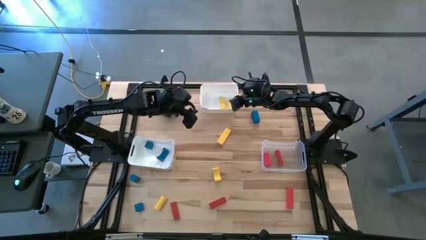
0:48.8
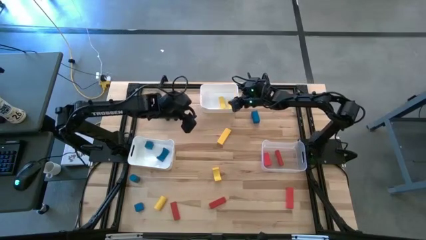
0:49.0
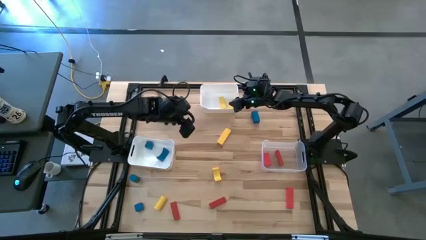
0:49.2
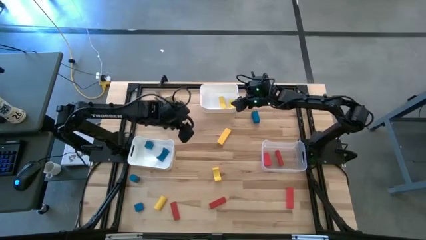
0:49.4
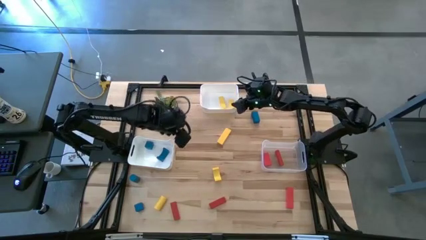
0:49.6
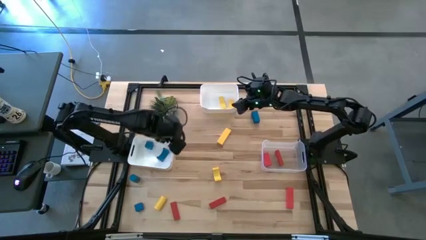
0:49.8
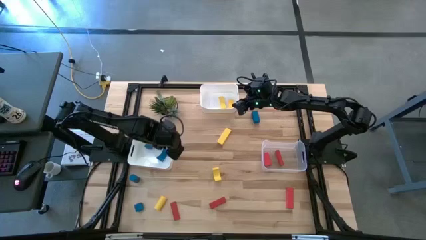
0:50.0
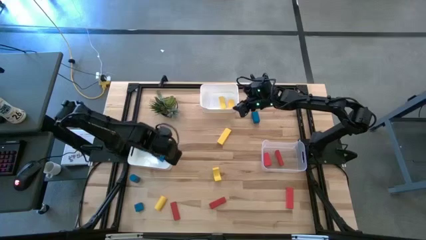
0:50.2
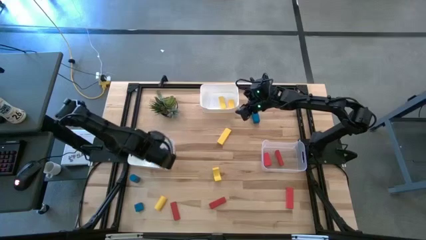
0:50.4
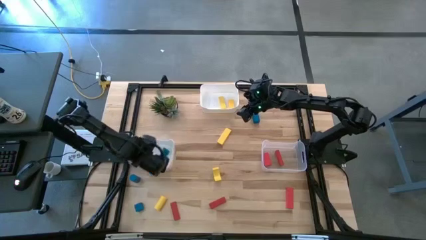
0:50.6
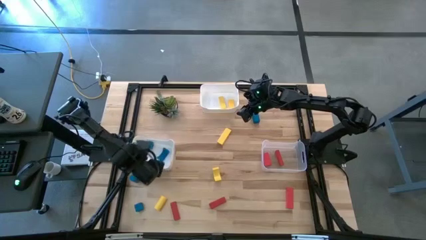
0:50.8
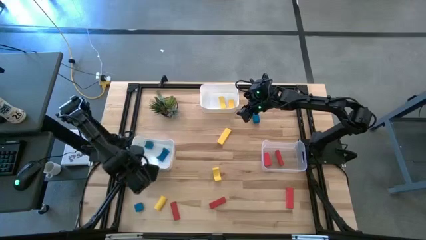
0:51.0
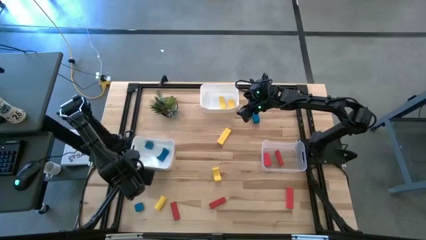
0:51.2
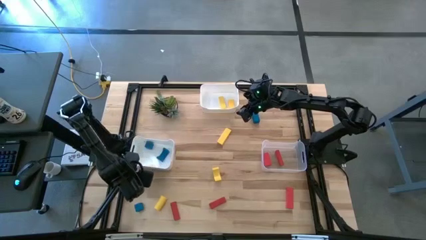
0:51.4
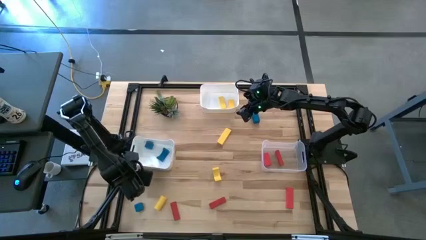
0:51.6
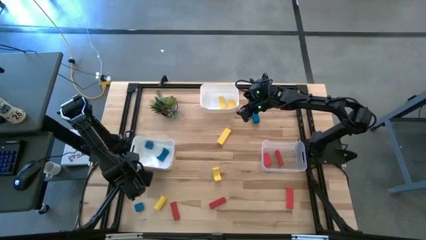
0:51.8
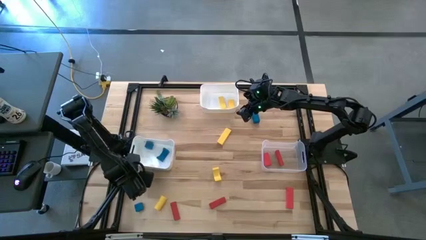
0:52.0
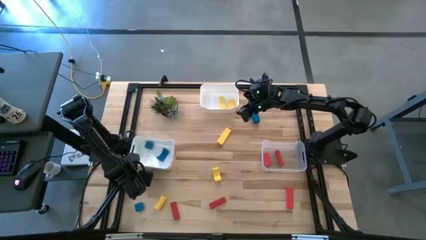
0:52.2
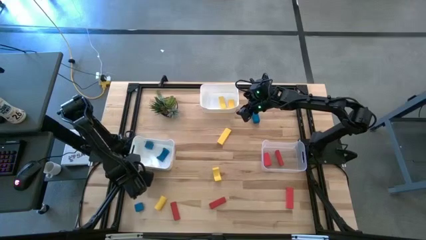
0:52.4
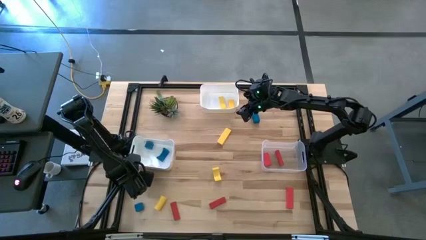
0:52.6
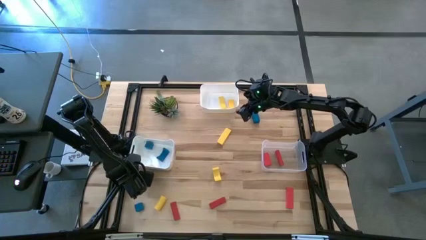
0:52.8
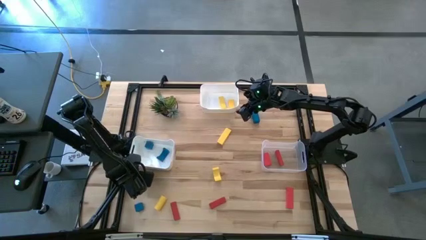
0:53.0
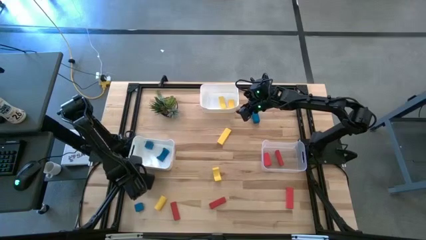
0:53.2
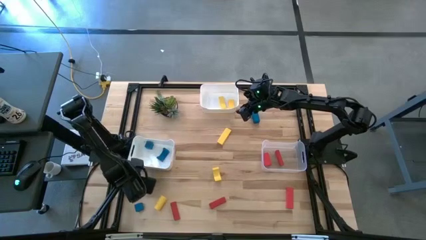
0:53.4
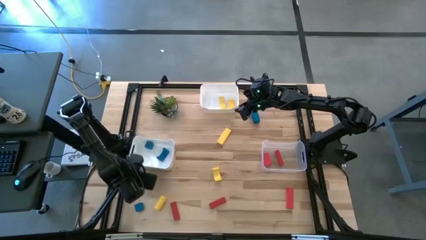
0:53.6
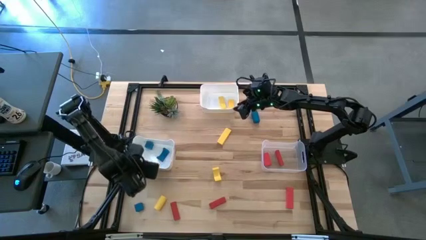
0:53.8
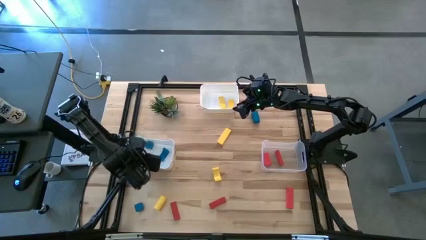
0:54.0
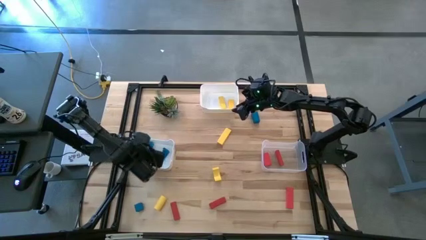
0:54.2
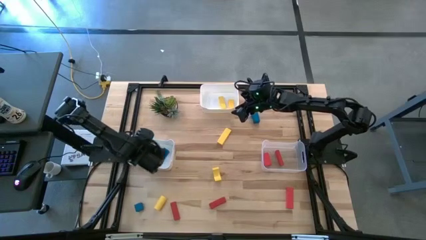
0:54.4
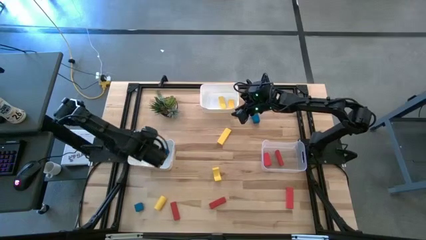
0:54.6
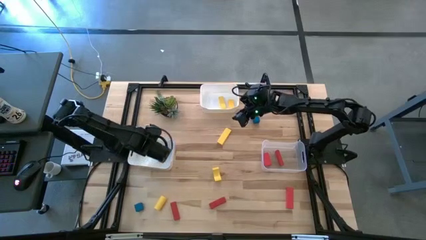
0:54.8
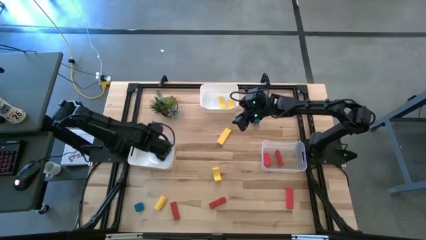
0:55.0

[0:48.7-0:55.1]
Task: Sort & place blocks by color
Put the bottom left blue blocks into the bottom left white bin

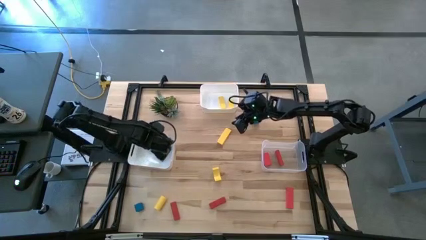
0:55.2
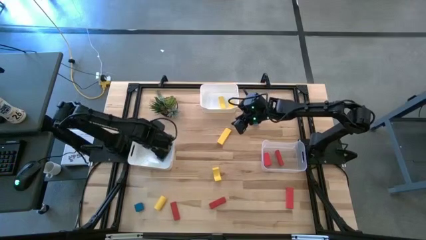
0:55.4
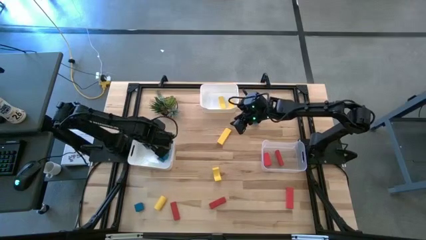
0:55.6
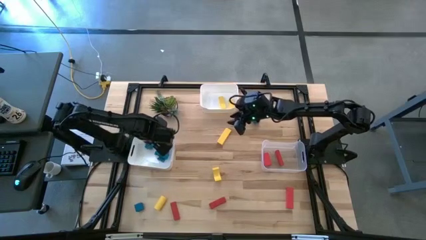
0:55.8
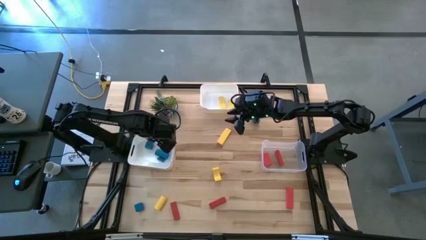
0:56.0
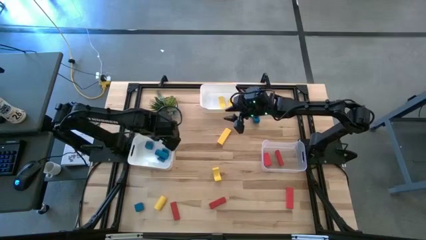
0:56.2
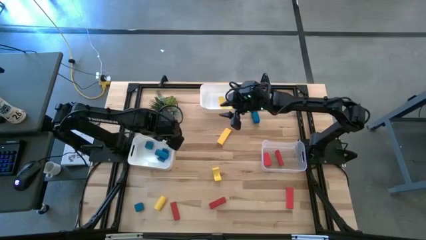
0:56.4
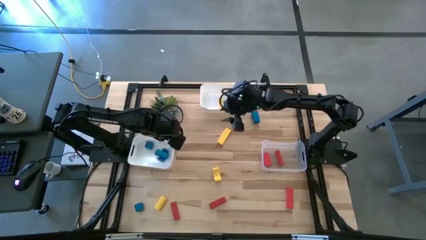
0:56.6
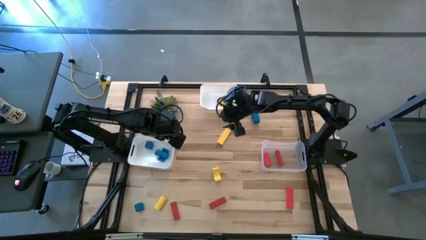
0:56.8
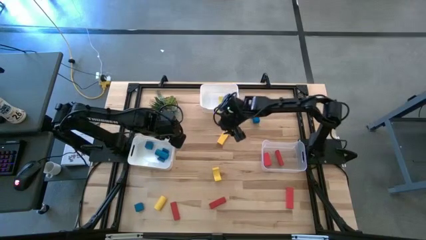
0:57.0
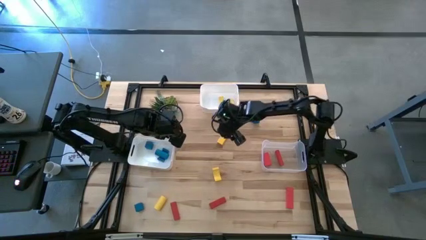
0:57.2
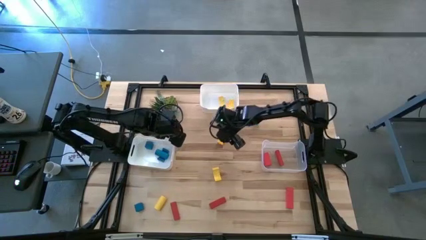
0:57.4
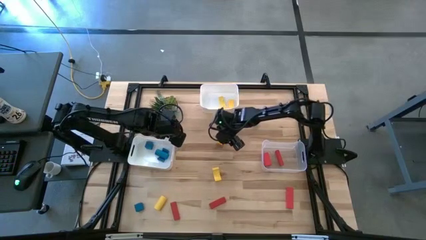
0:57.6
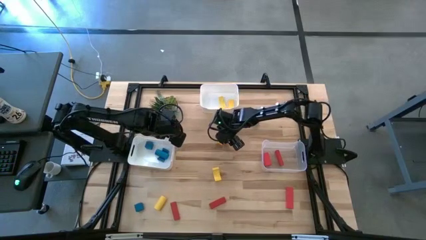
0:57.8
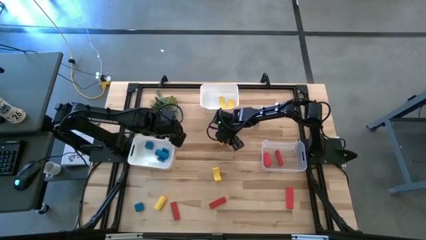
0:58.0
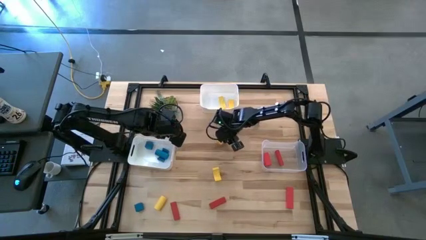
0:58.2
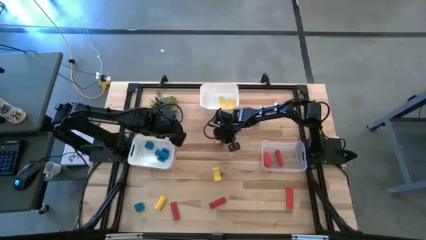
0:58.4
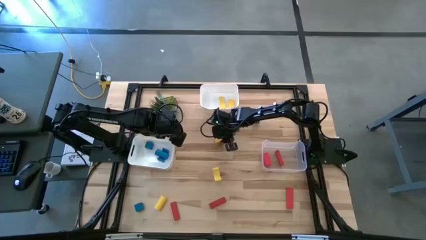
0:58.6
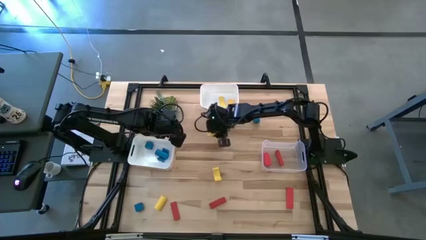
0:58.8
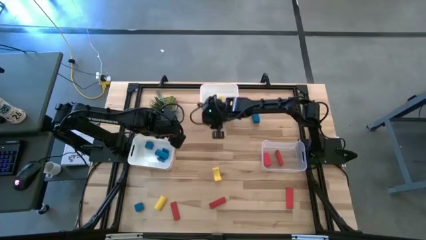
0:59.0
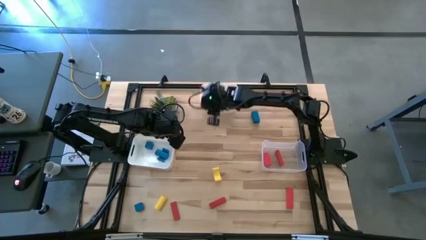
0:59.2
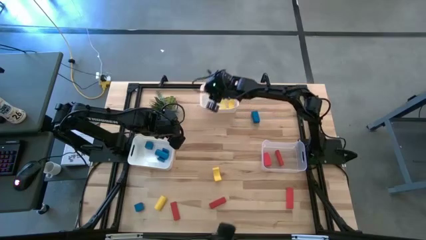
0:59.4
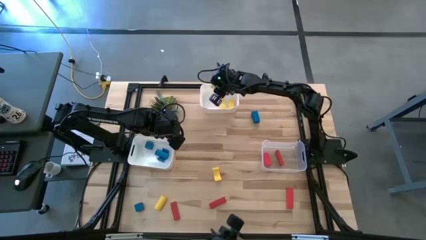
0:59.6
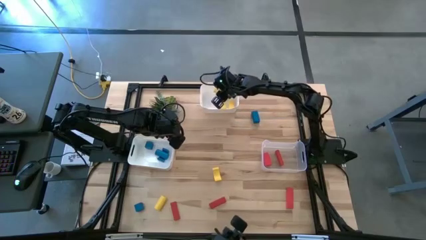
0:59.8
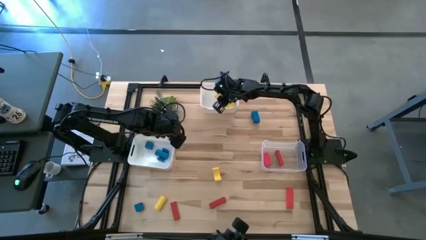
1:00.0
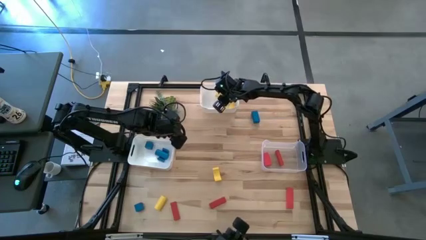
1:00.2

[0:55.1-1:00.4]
Put the top yellow block into the top white bin

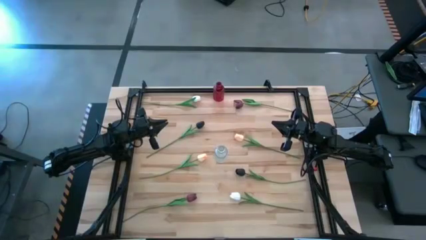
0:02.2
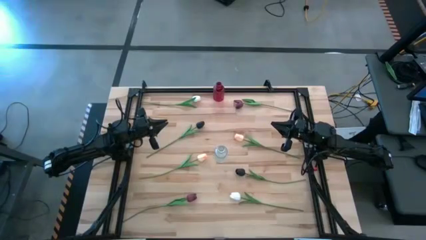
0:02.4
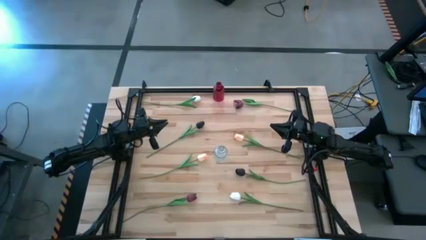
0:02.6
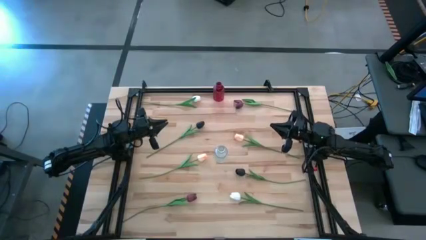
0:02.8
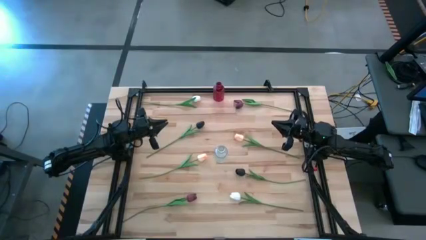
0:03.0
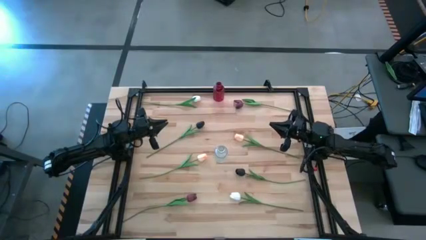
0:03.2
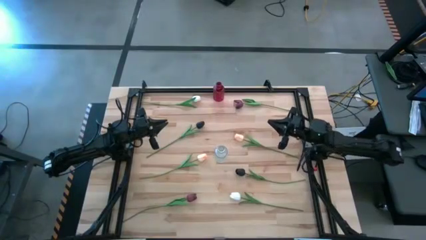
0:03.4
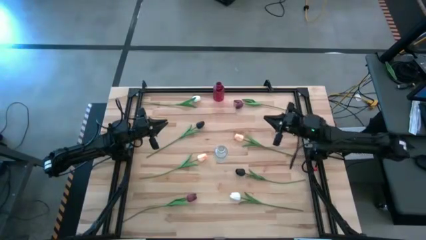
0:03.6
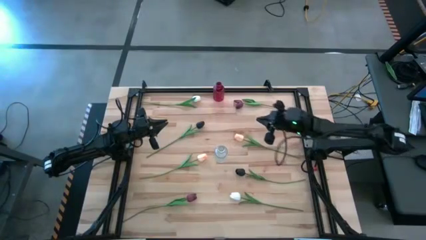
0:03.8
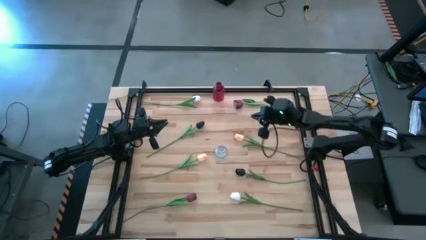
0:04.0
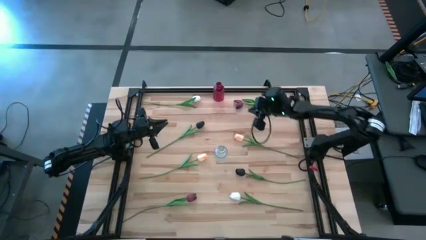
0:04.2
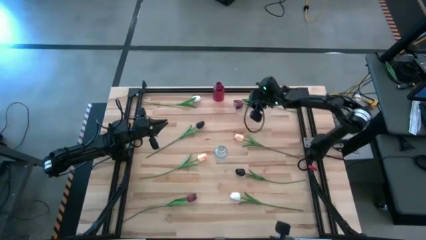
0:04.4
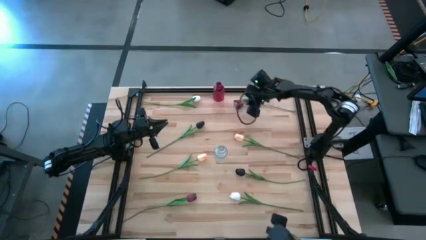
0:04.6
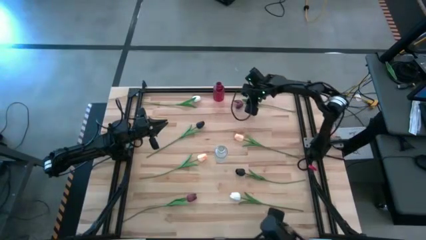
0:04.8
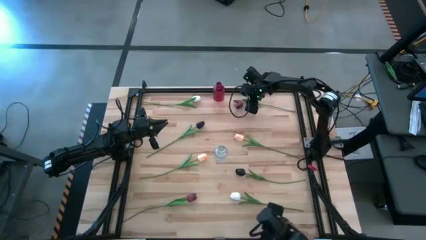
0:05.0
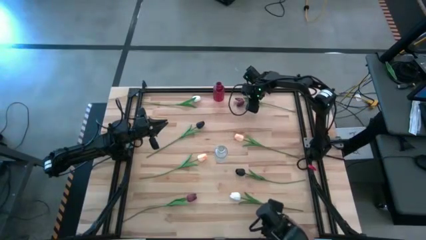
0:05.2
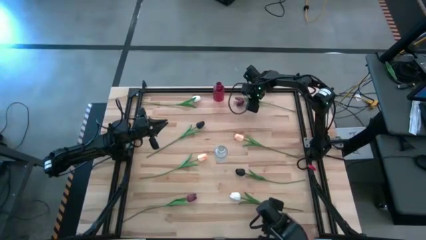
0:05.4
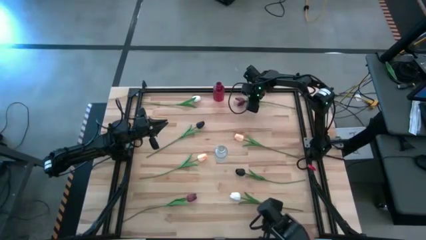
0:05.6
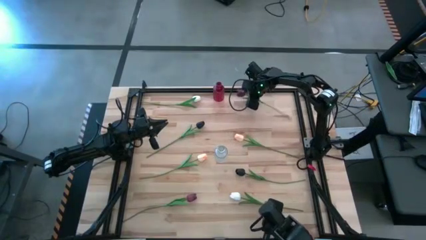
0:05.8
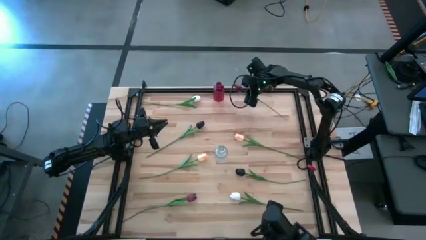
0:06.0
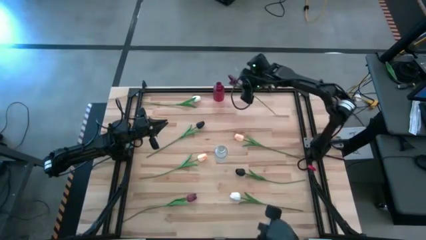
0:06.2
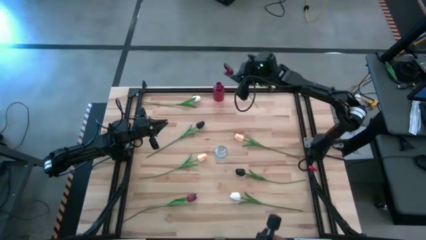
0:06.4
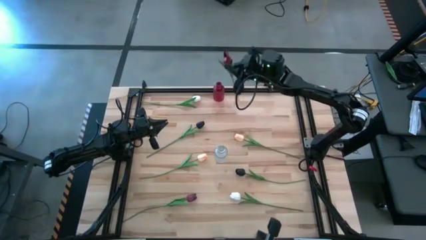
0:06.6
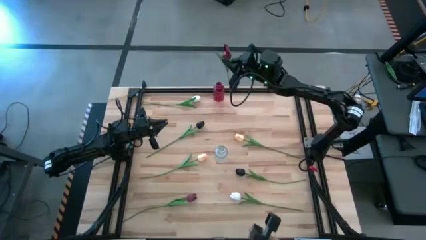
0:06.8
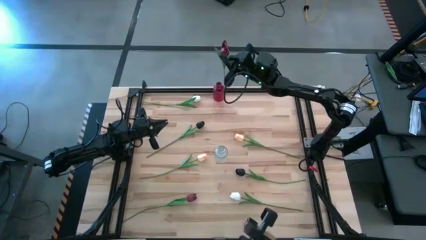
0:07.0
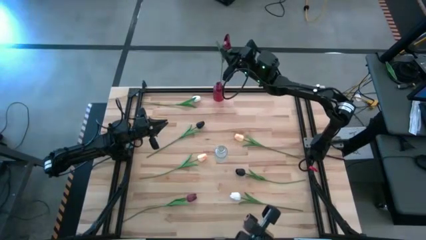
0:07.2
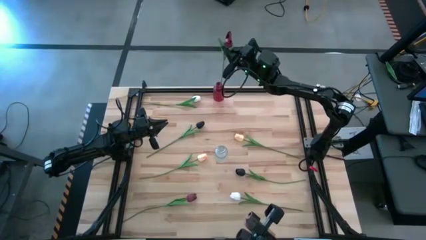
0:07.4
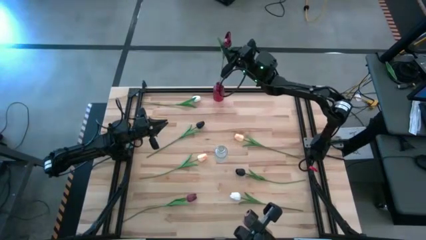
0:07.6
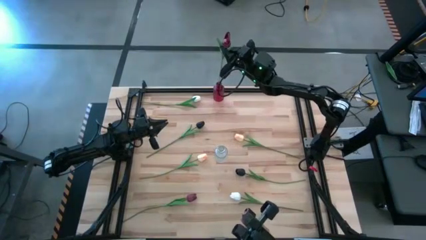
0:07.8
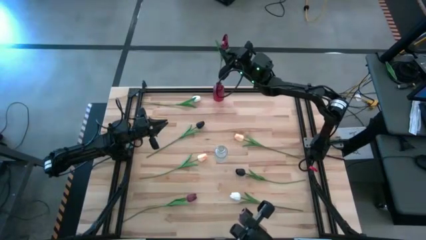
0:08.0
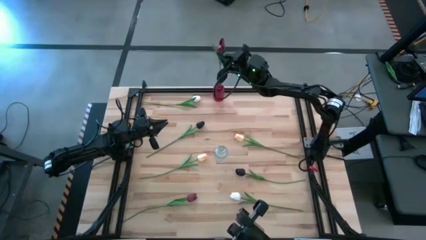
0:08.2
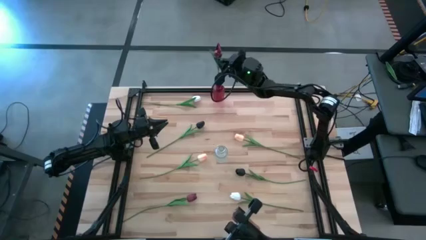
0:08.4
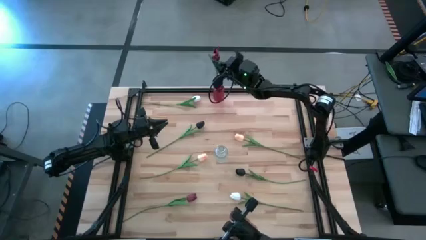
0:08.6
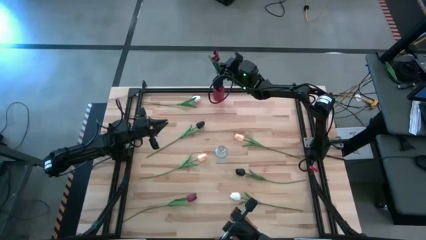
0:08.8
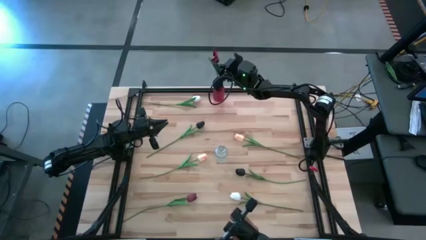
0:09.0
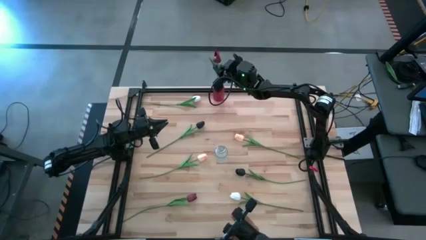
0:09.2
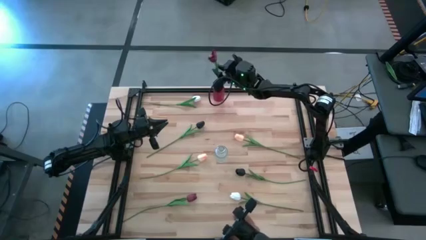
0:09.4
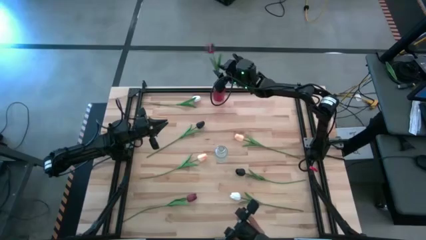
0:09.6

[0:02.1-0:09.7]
Task: Sort flowers into vase by color
Put the top red tulip into the red vase
